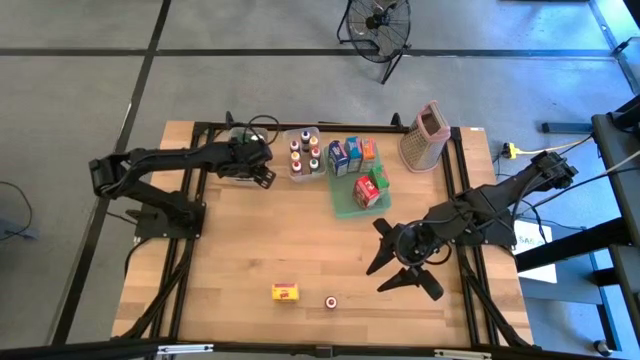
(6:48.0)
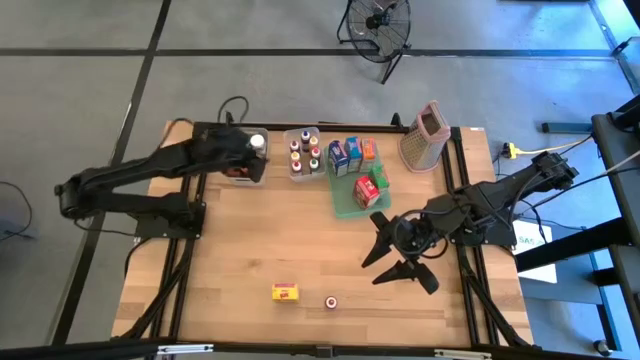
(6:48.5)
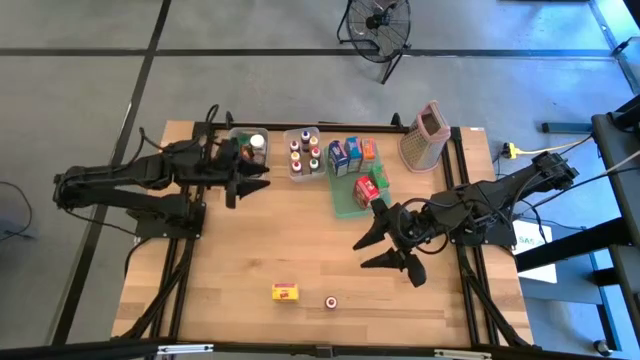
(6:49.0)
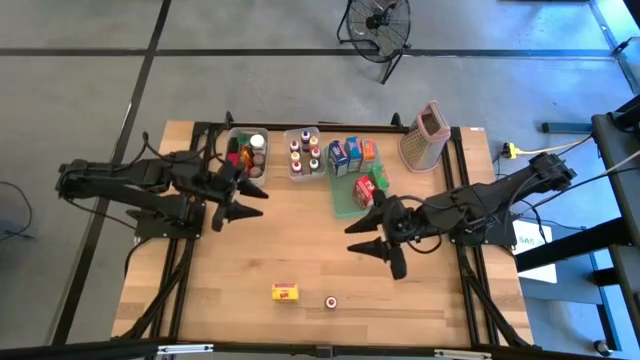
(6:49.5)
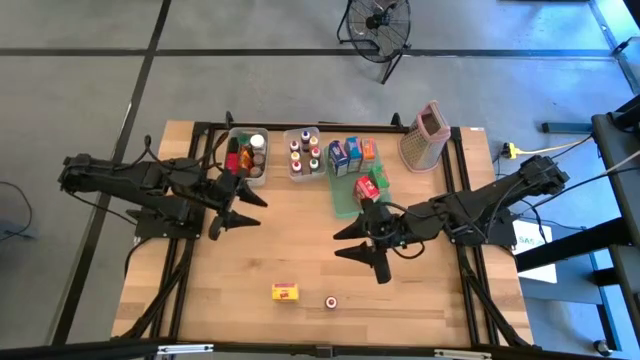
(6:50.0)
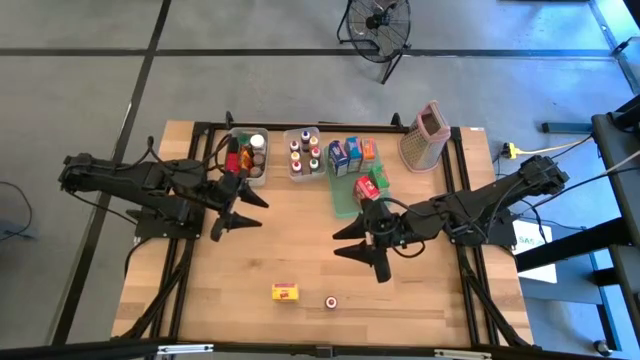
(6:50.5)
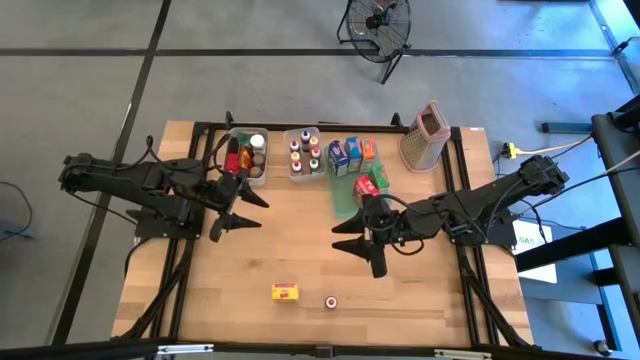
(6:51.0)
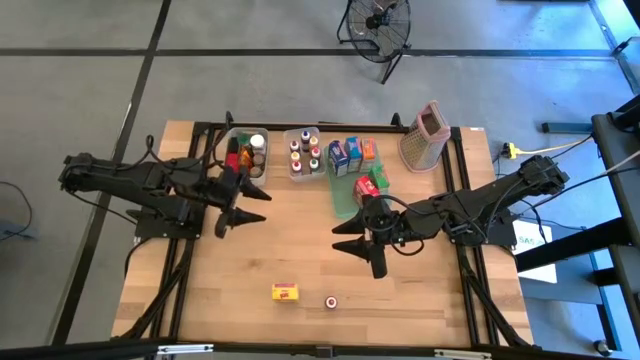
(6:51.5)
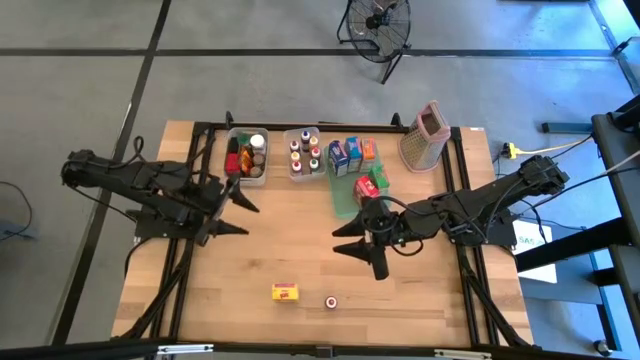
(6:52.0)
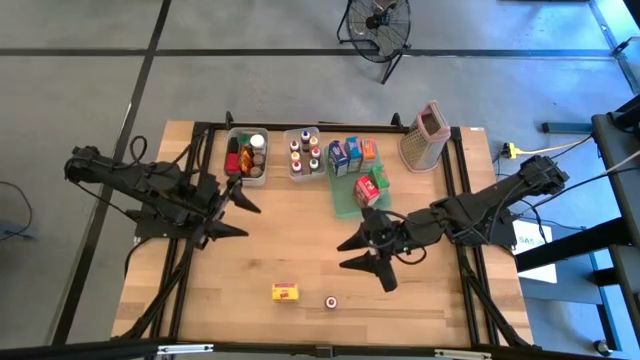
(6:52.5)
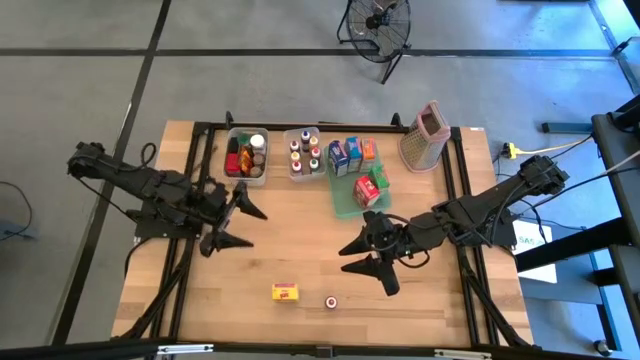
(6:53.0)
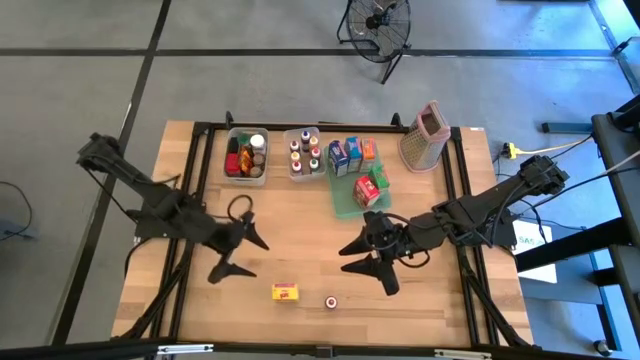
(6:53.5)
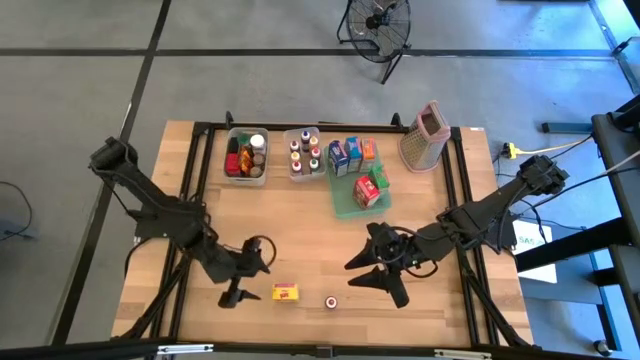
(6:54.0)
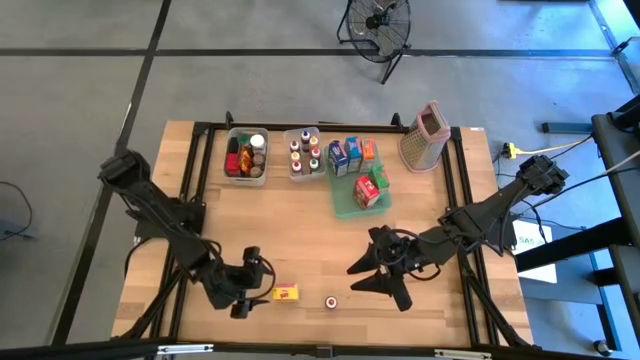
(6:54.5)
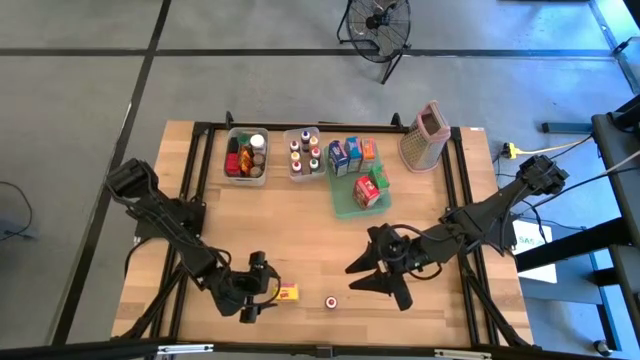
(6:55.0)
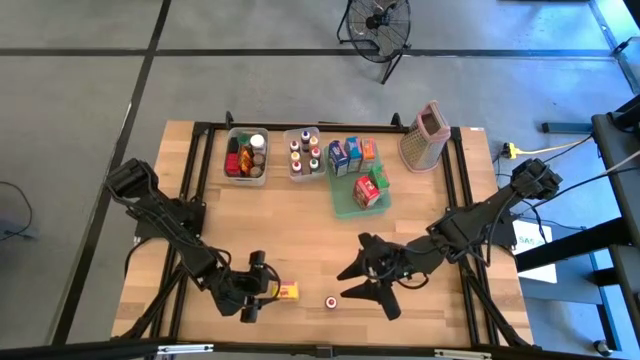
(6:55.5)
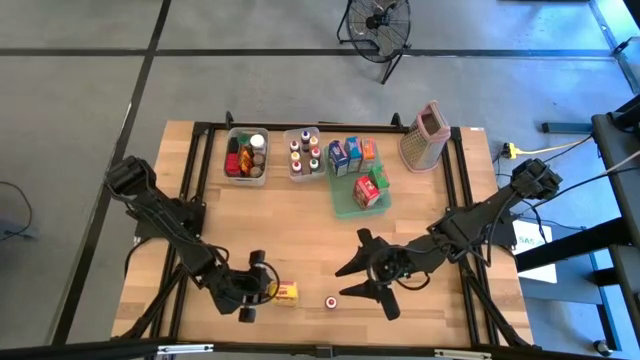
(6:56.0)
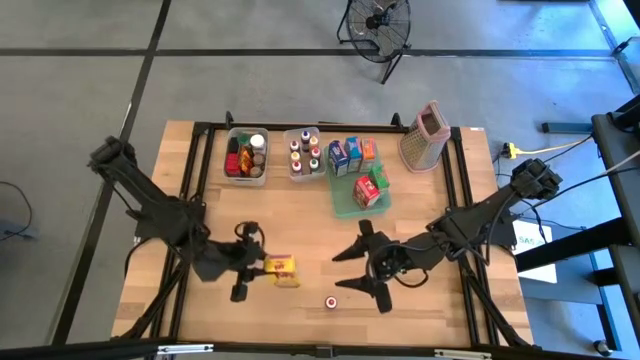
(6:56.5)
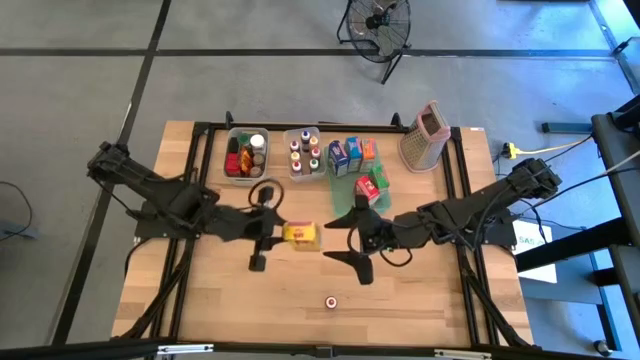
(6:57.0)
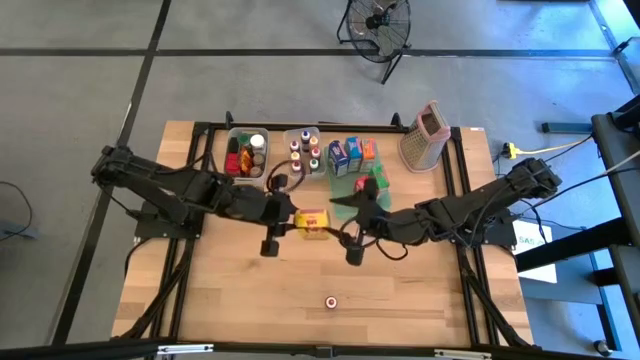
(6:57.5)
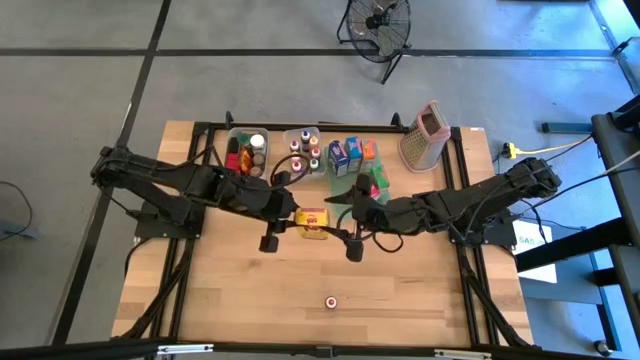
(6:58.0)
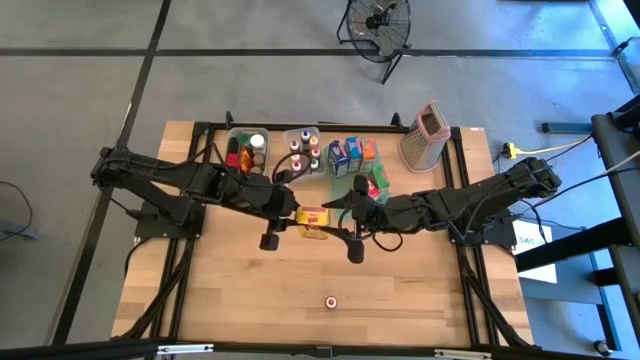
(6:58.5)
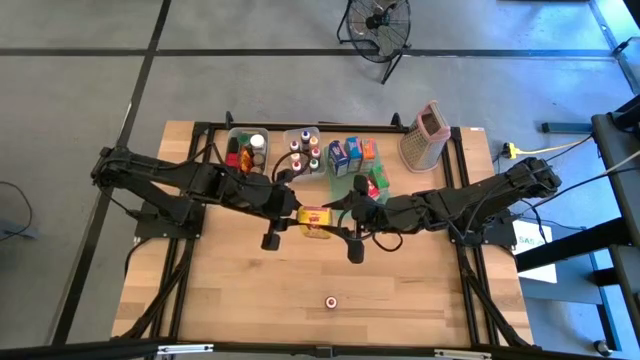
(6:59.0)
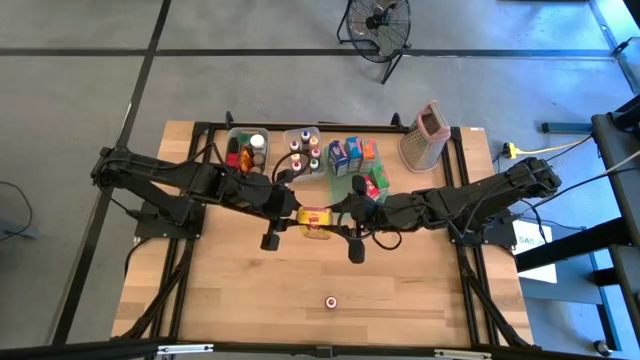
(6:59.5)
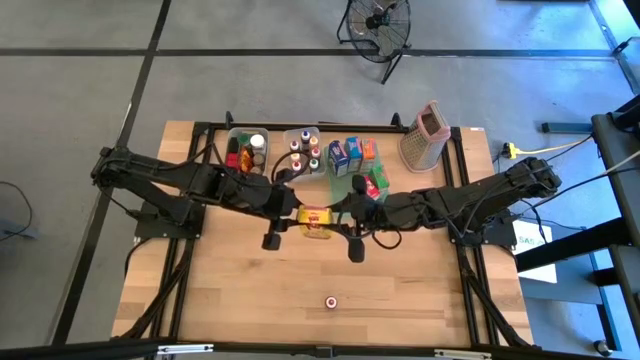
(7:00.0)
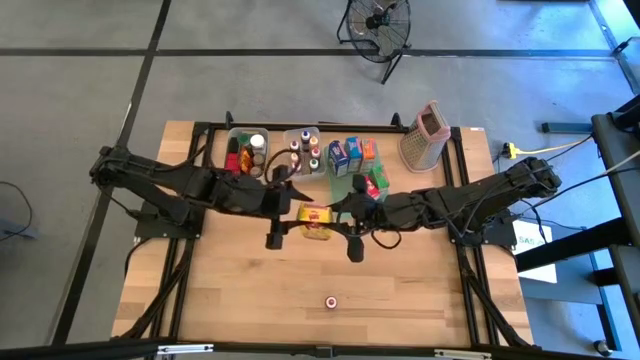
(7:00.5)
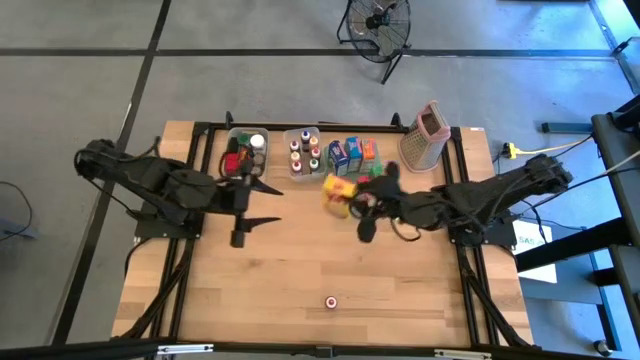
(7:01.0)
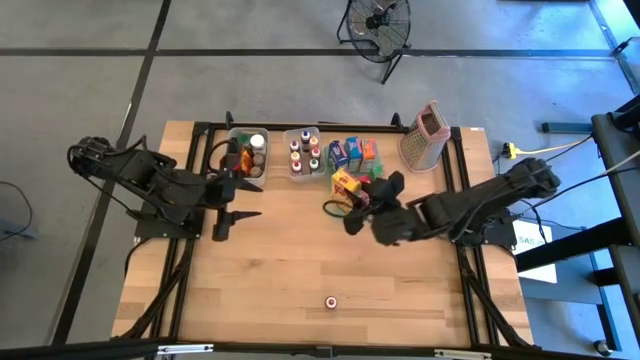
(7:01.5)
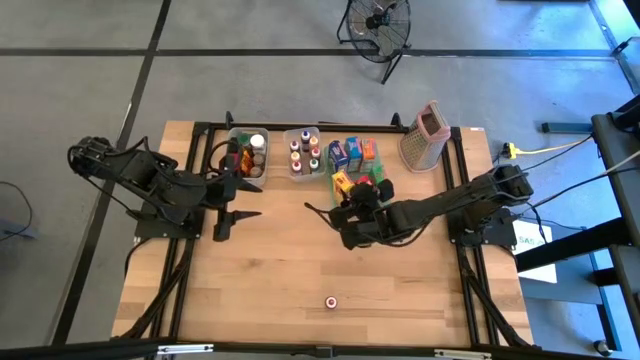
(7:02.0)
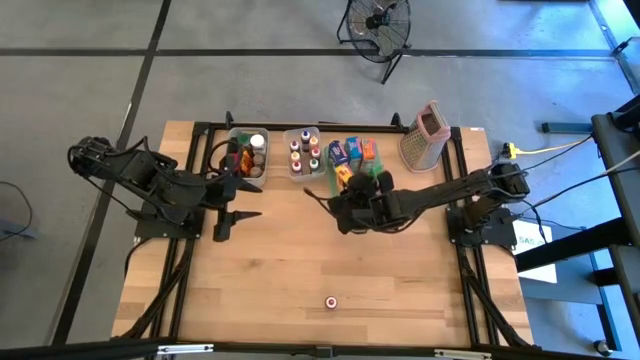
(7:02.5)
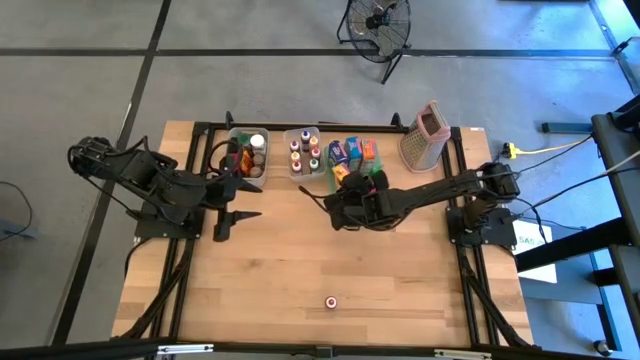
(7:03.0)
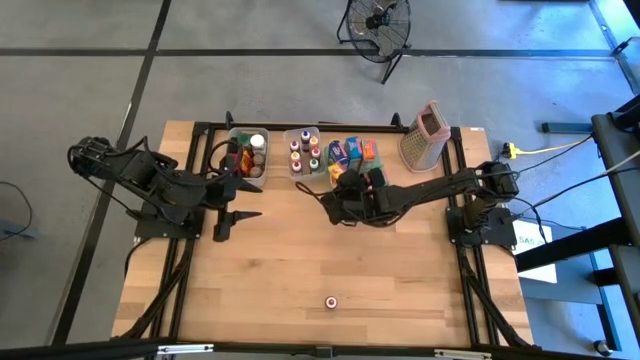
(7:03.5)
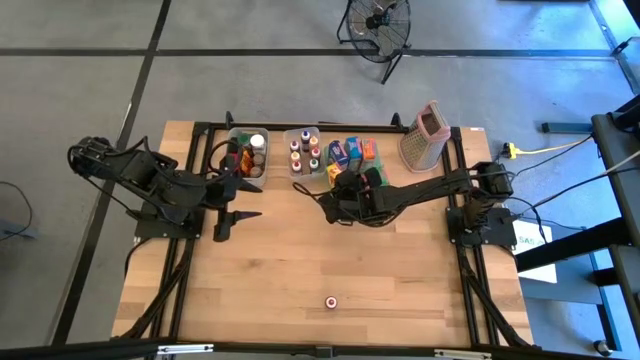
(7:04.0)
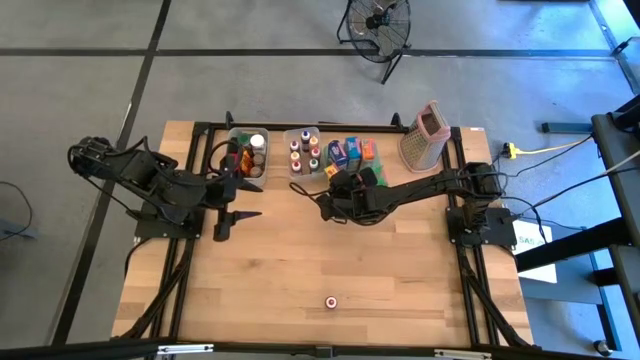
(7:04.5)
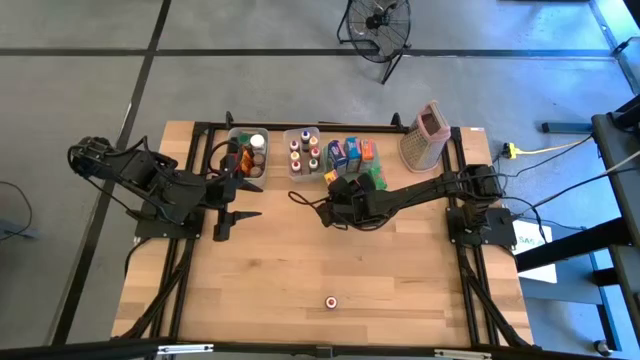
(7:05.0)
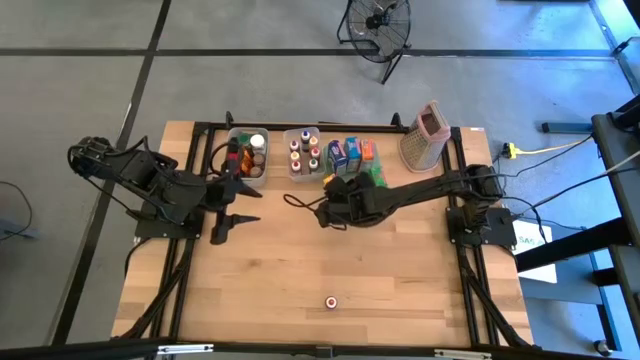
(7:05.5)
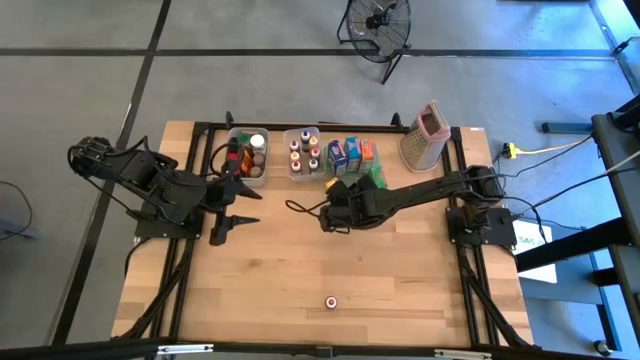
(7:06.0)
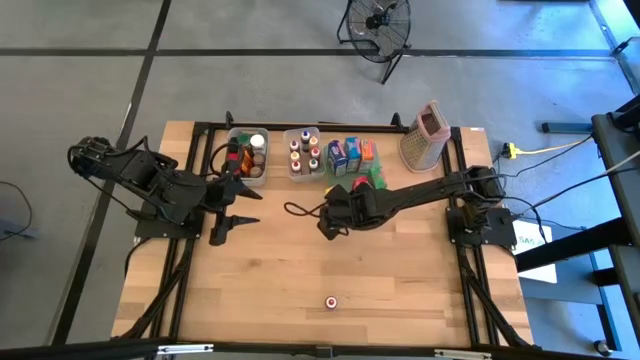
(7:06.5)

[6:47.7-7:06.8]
Task: Pick & Place Kitchen Items
Put the yellow cereal box into the blue bin

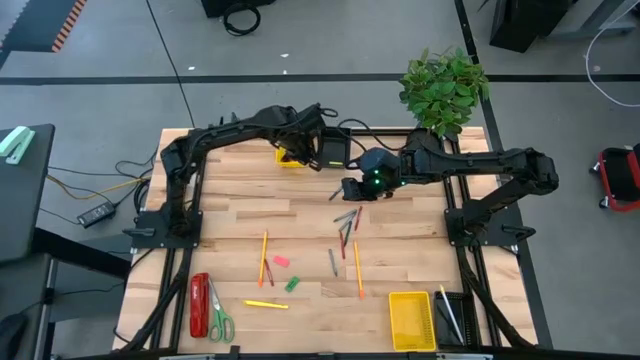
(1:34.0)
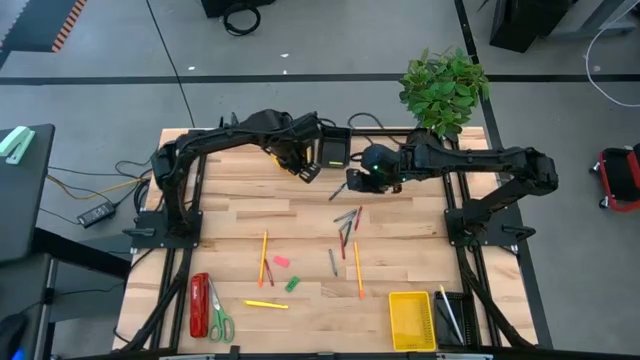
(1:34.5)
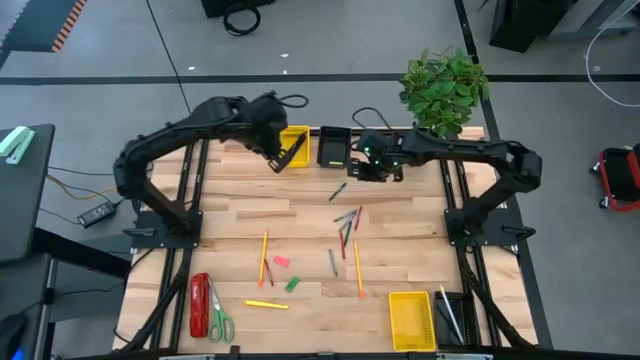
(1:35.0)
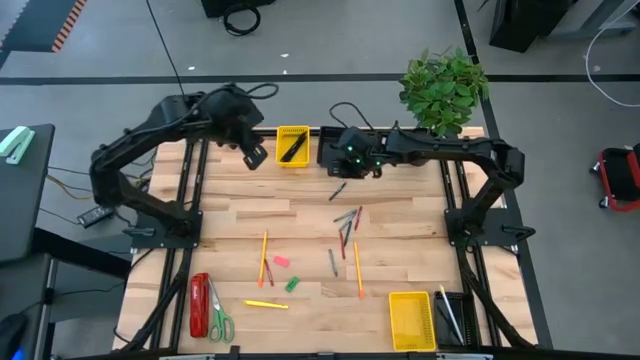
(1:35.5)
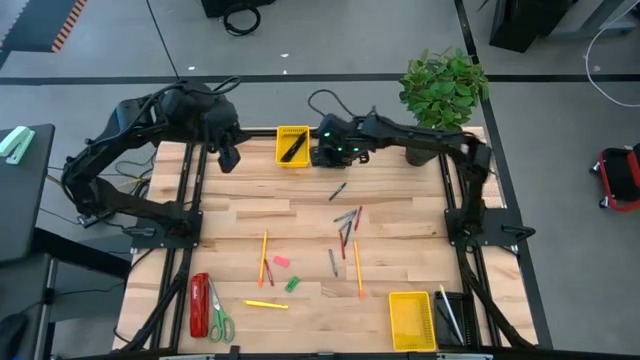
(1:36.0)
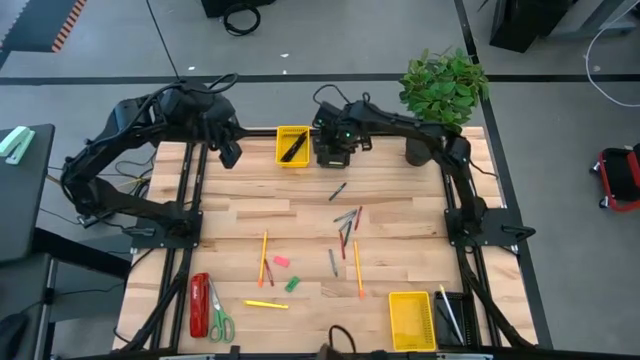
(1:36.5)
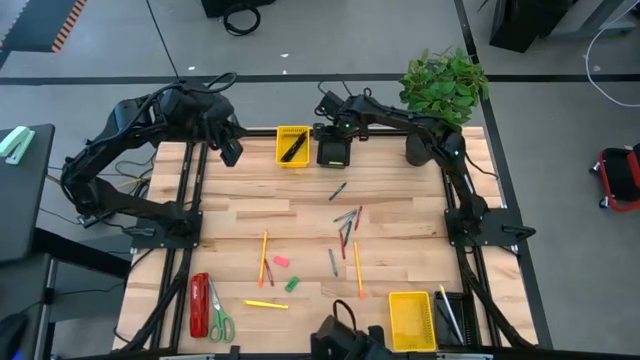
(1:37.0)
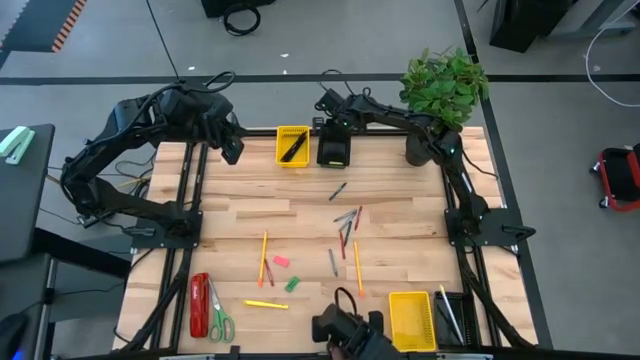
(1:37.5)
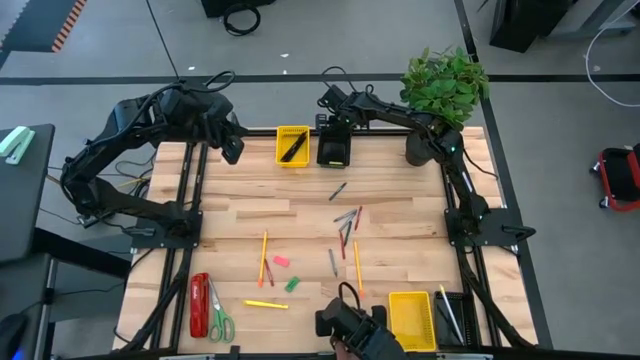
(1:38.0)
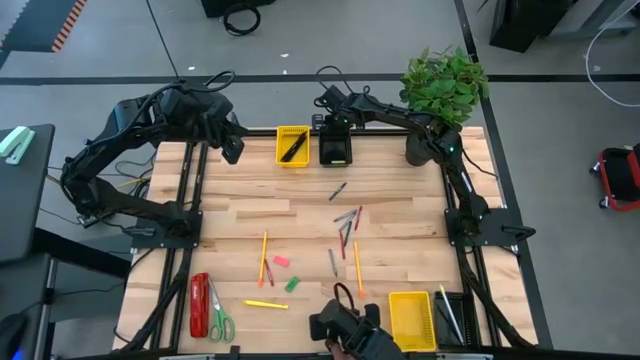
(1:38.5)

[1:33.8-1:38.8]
Task: Sort crayons/erasers/pens/pencils in bins
Adjust the top black bin
